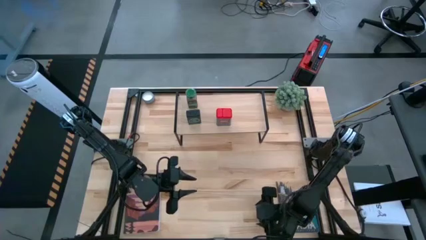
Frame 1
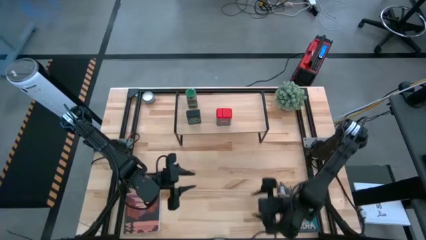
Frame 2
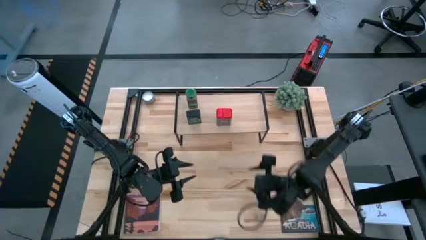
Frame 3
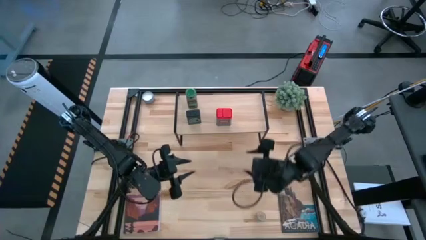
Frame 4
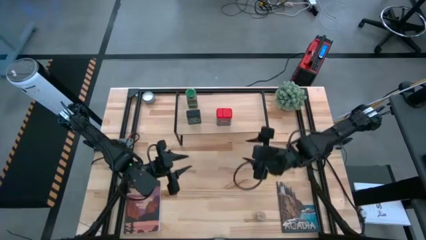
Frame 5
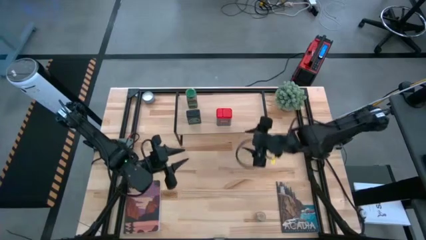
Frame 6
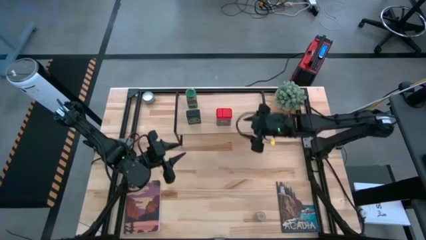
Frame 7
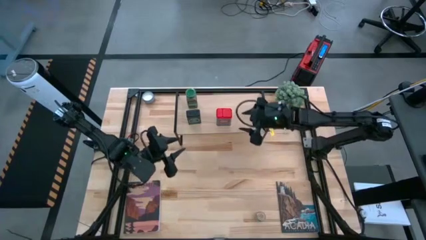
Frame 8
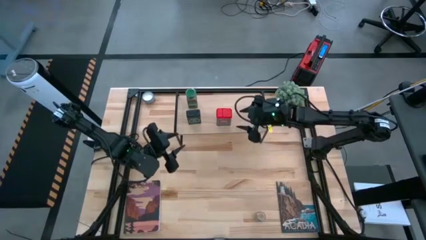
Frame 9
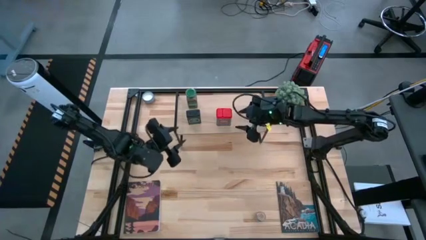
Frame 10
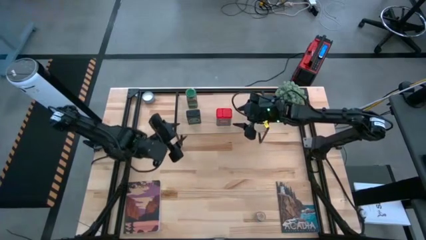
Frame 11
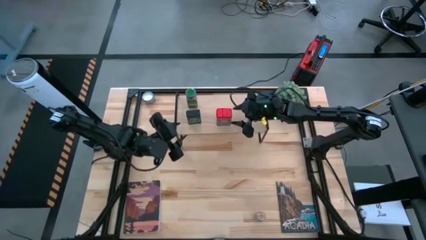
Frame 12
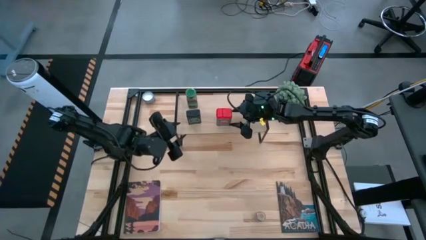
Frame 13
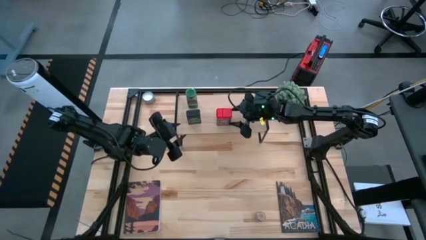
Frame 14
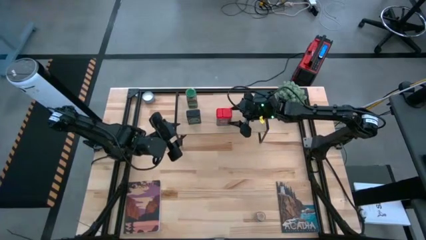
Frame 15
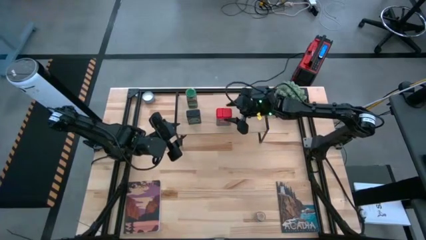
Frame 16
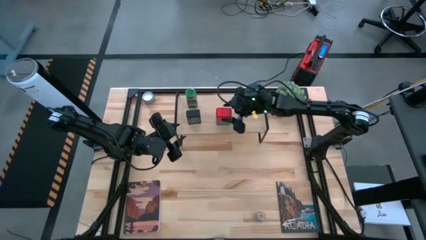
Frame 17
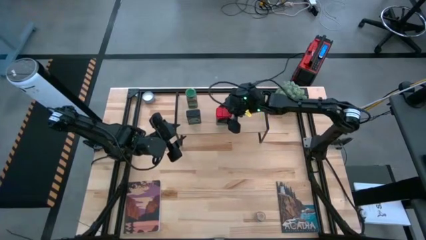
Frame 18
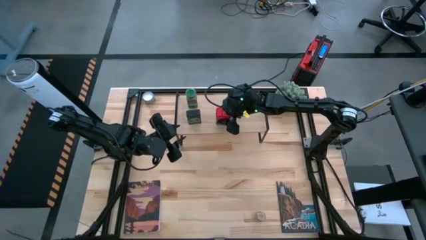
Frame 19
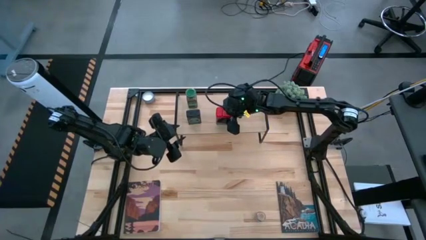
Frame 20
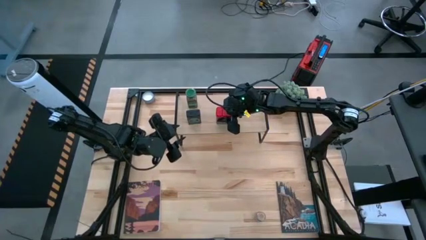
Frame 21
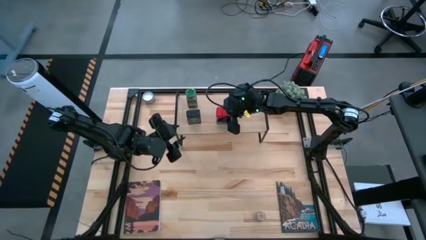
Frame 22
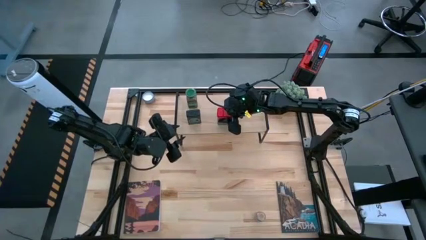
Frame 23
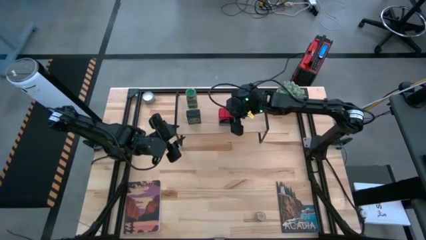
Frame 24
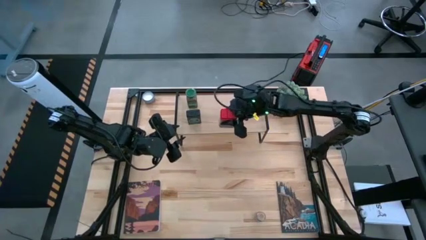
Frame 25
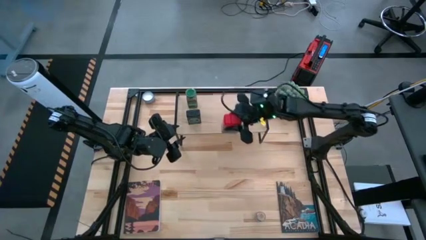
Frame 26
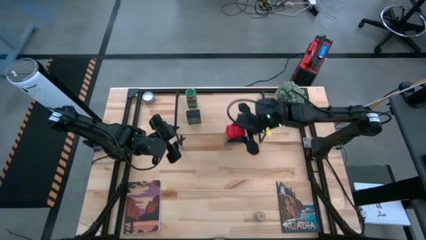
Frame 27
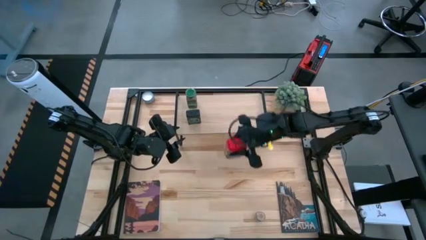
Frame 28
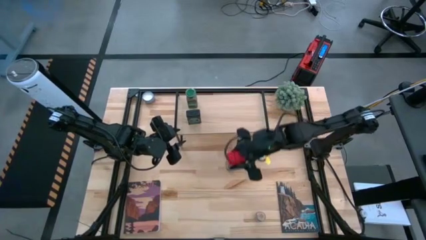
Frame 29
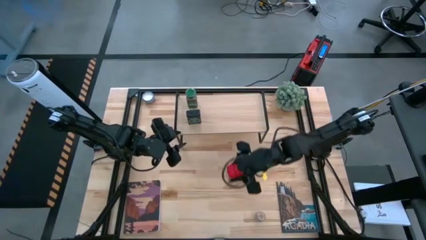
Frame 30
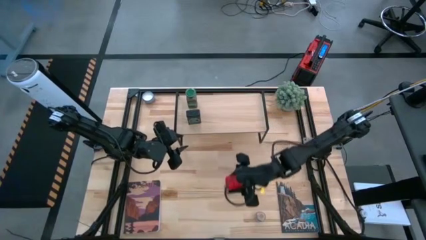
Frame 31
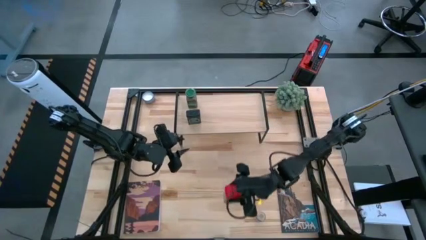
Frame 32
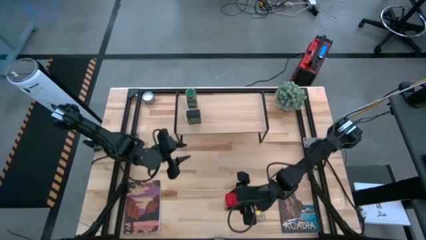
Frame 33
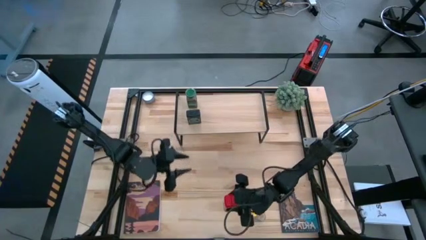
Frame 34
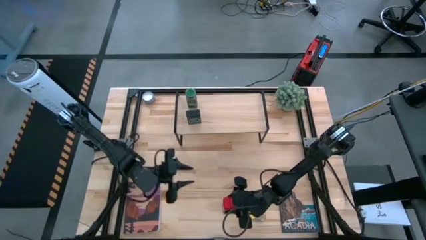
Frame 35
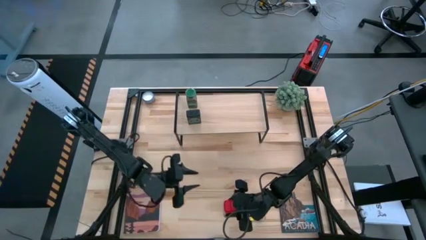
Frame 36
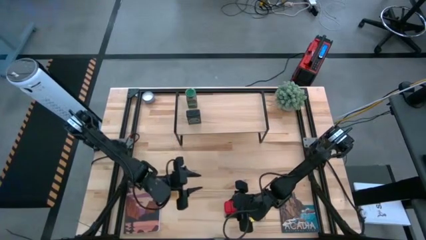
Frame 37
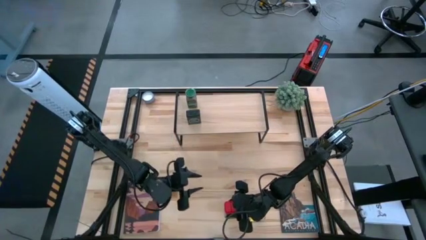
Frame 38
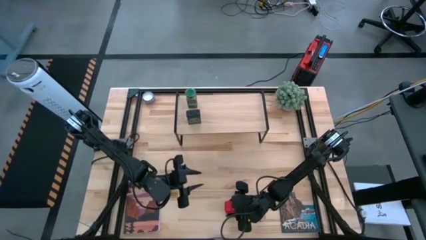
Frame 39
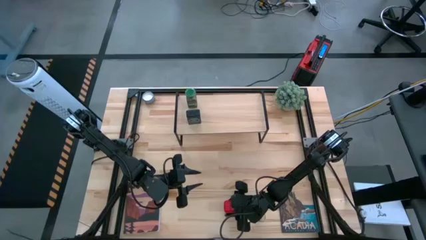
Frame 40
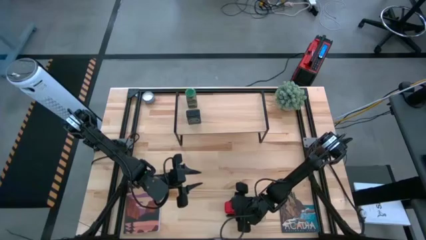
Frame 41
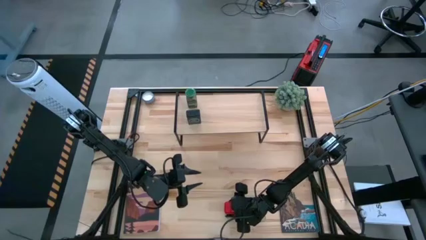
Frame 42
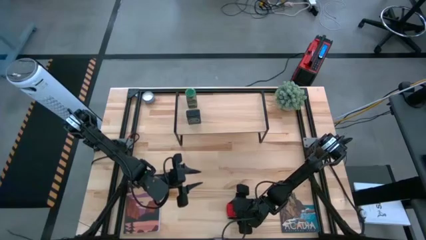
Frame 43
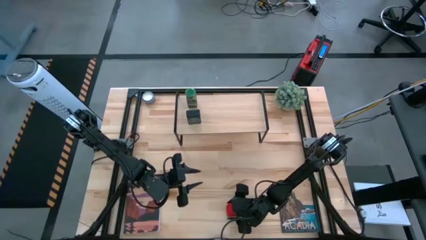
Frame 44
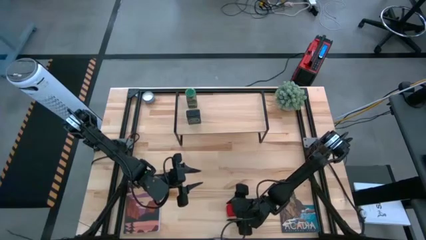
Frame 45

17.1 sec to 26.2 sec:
Task: Shelf spices
Remove the red seasoning can from the shelf

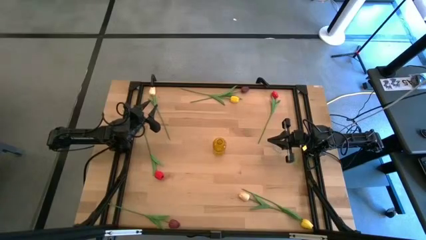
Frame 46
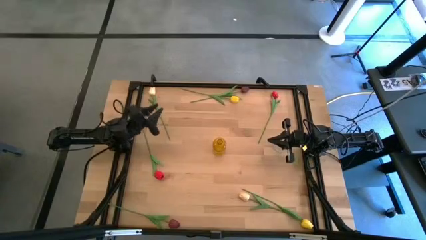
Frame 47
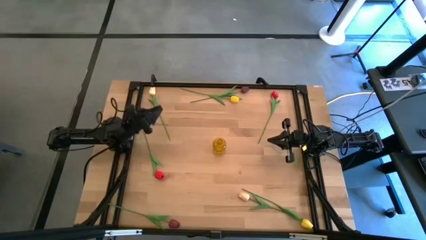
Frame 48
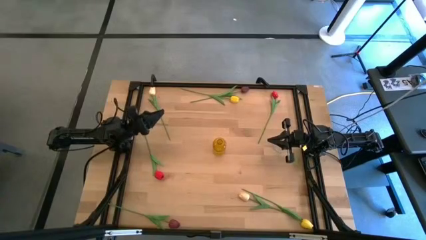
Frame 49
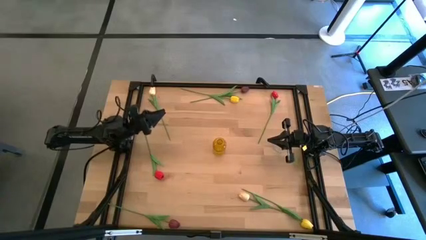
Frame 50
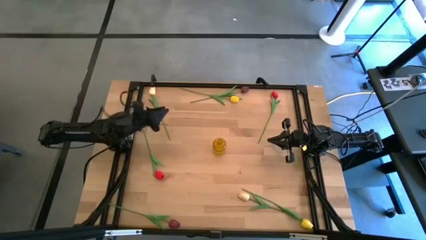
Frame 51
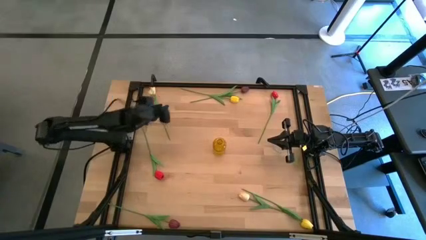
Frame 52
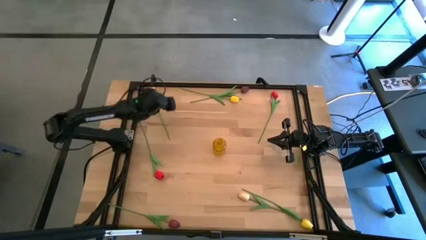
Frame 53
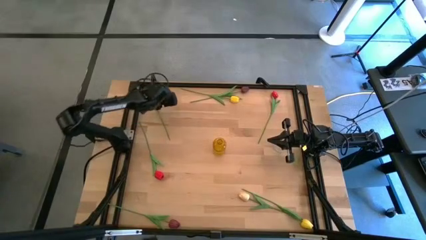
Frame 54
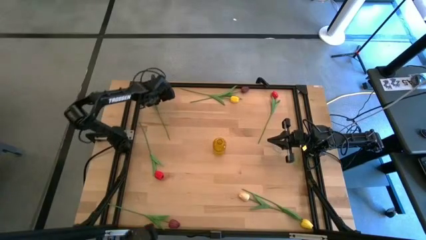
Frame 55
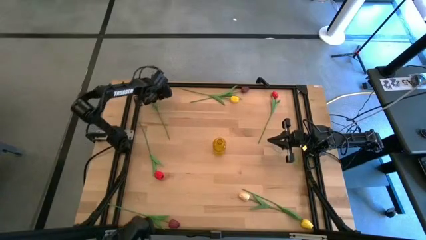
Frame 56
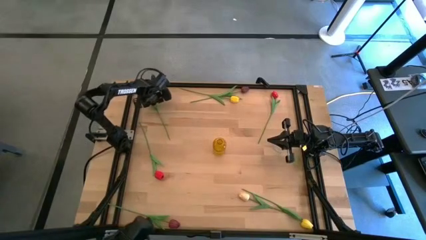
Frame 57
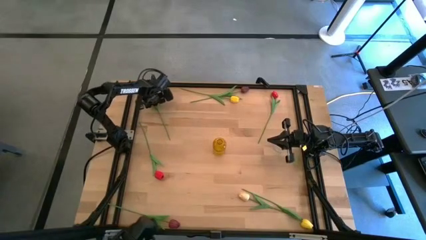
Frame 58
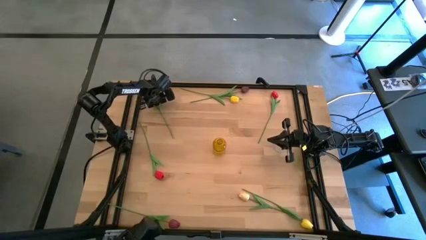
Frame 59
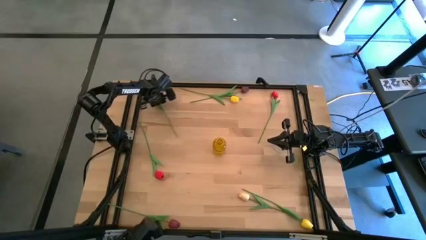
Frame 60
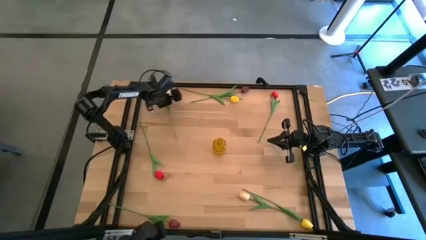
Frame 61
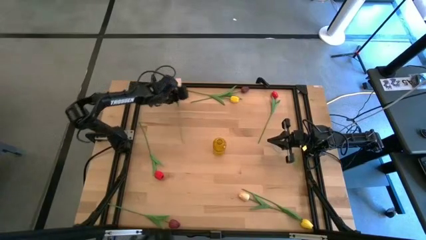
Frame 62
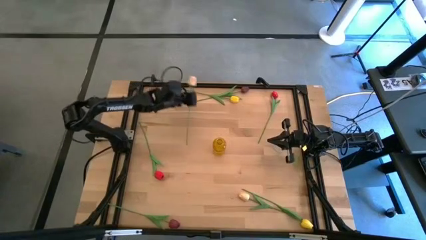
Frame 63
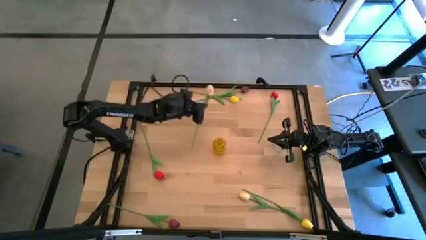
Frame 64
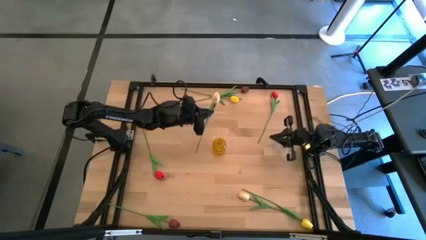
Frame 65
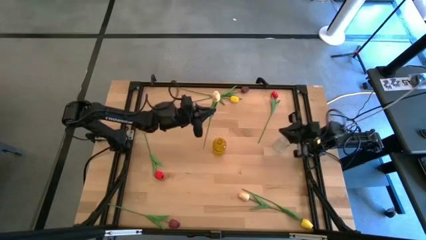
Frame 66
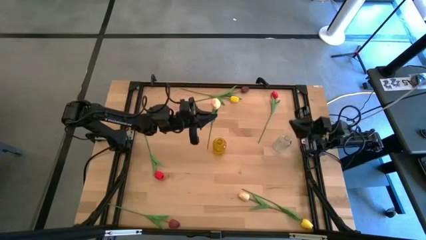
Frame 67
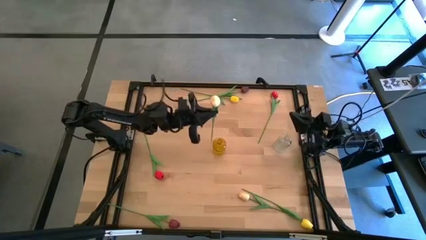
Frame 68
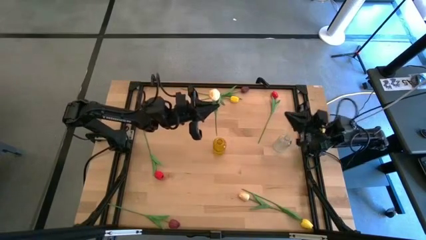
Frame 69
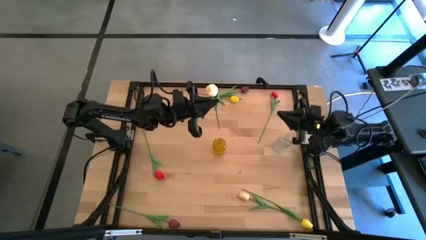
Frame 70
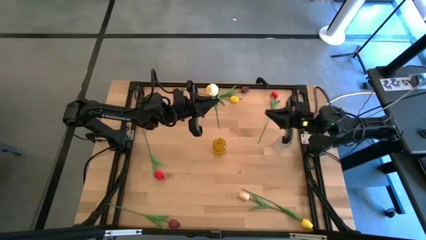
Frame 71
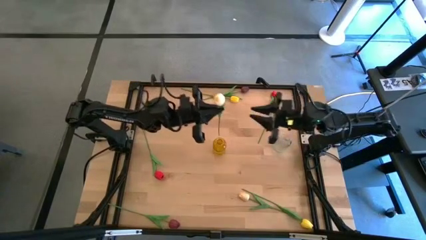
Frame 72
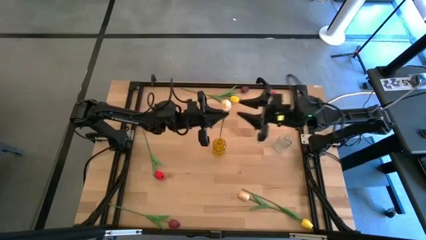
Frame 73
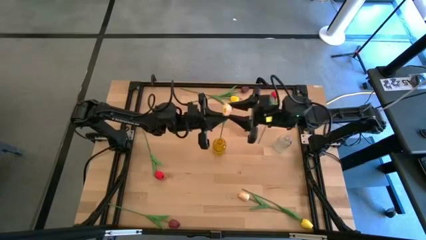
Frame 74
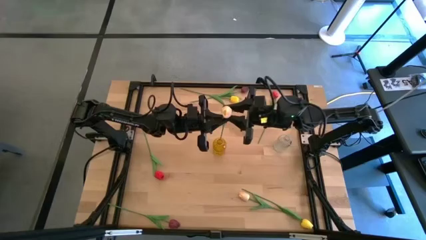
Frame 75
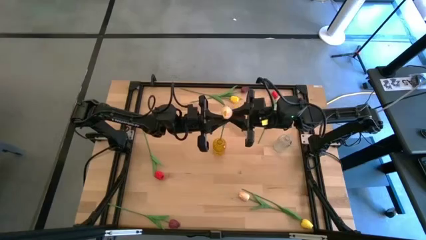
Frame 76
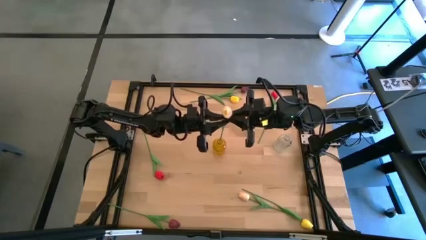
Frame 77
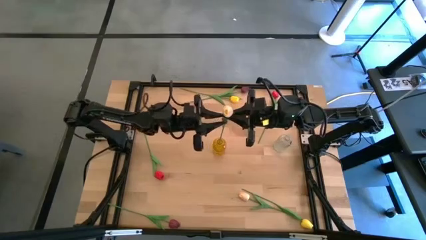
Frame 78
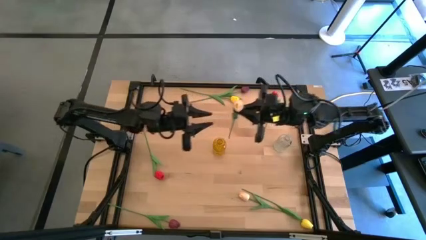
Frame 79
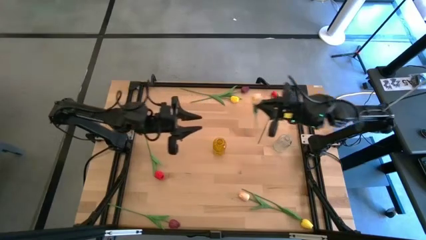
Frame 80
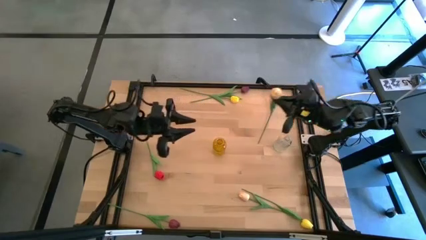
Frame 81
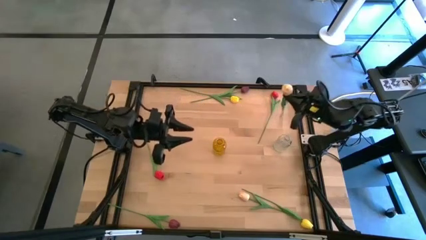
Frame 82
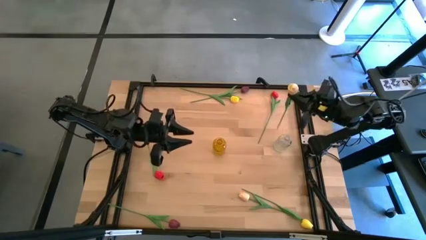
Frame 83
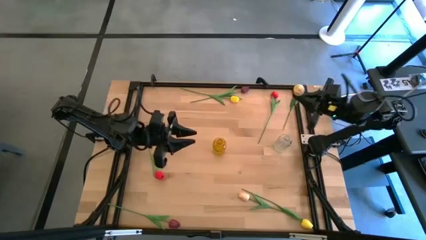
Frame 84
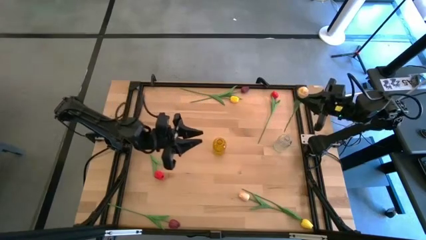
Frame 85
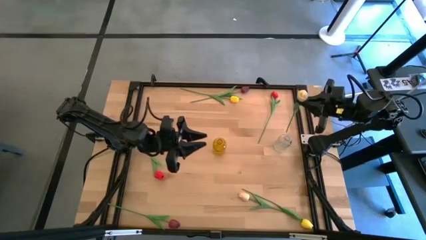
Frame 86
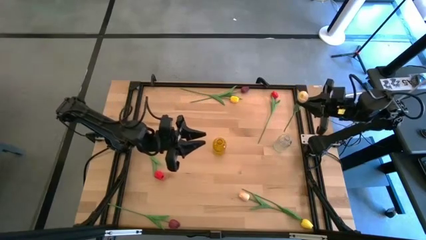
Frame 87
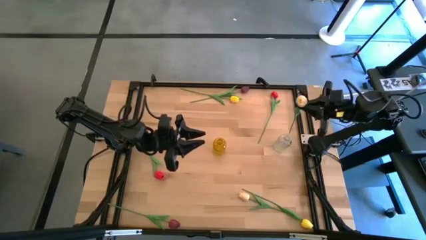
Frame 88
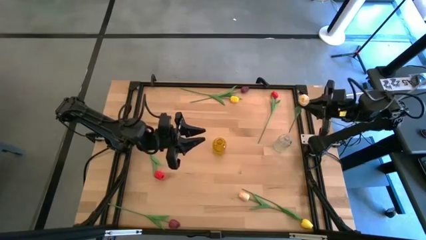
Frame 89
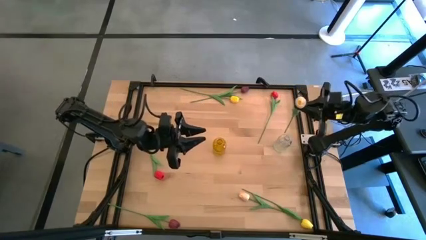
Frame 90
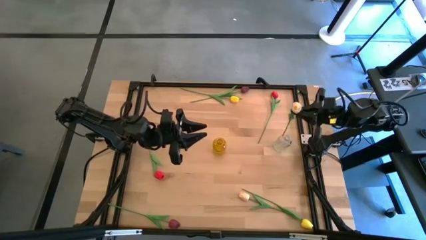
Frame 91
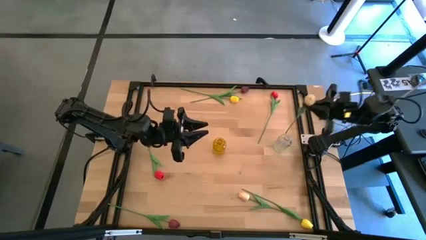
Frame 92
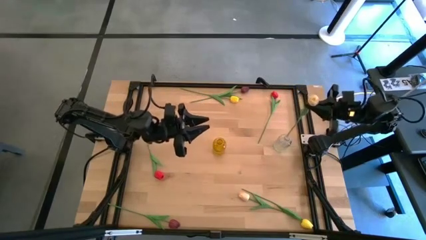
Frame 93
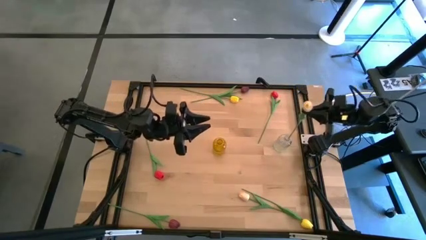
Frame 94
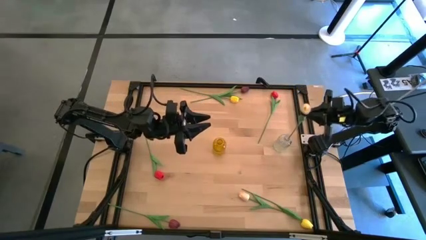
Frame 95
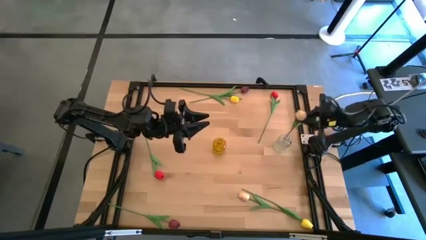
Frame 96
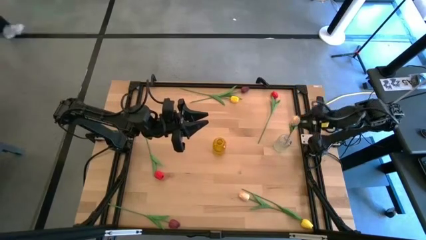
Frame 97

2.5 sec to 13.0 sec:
Task: Sort flowers into vase by color
Put the top left white tulip into the transparent vase
